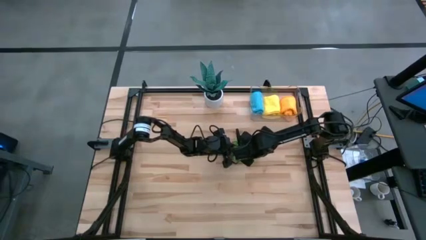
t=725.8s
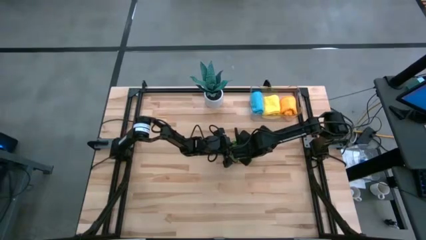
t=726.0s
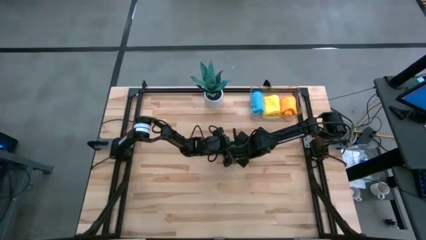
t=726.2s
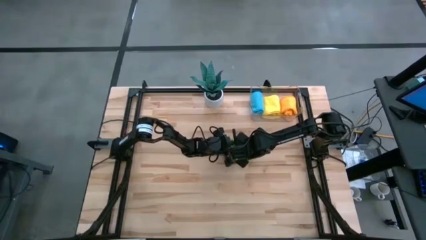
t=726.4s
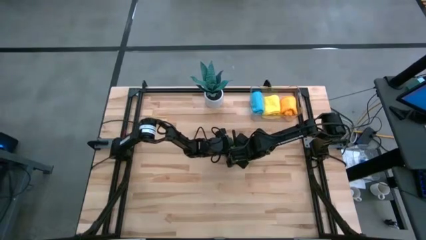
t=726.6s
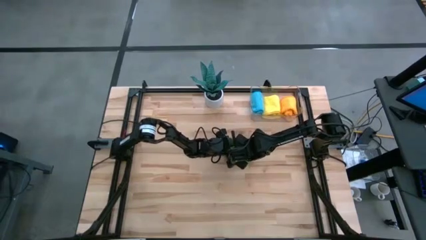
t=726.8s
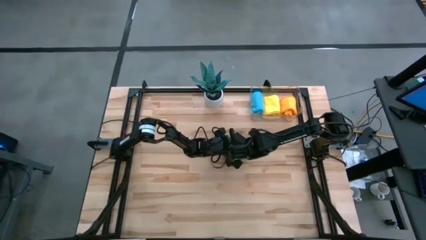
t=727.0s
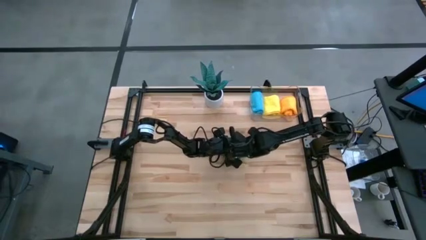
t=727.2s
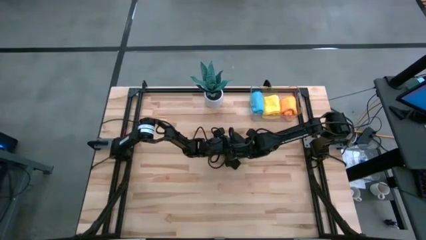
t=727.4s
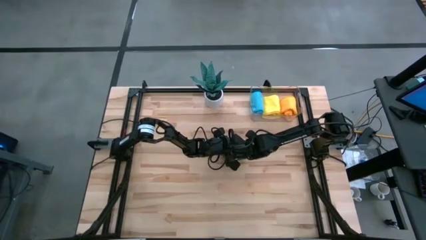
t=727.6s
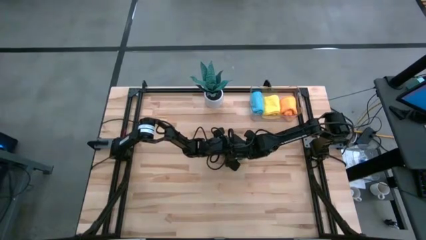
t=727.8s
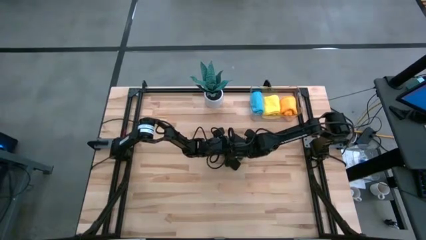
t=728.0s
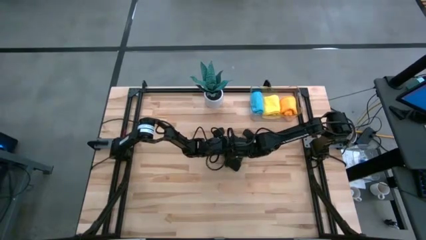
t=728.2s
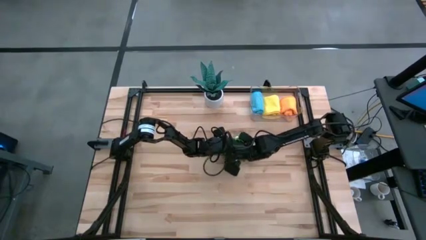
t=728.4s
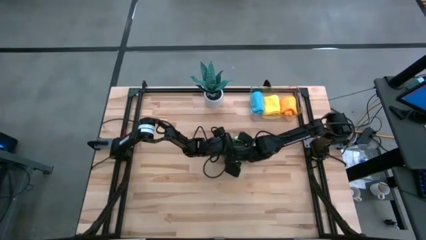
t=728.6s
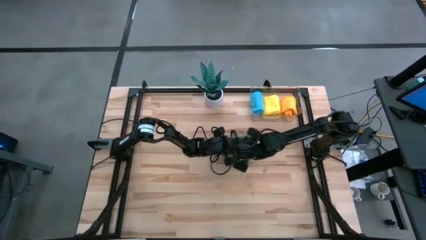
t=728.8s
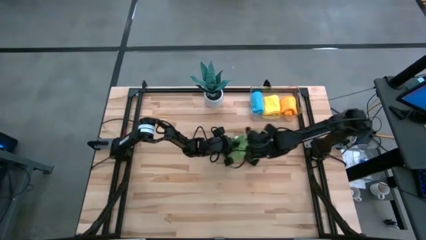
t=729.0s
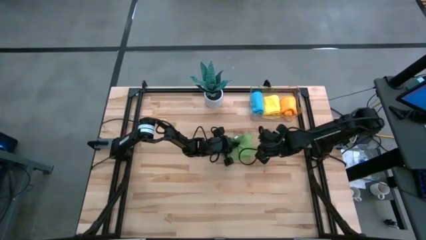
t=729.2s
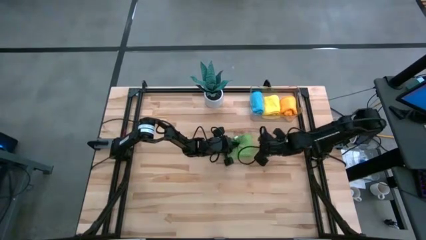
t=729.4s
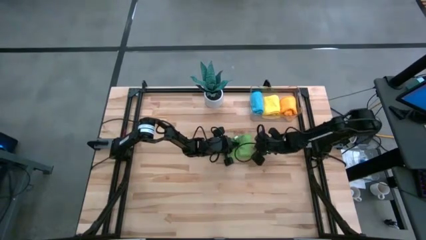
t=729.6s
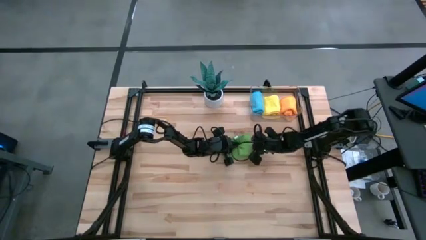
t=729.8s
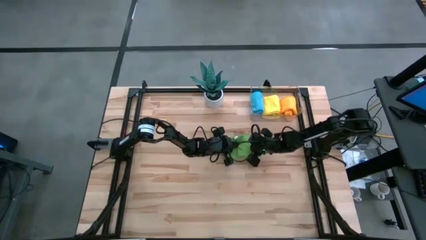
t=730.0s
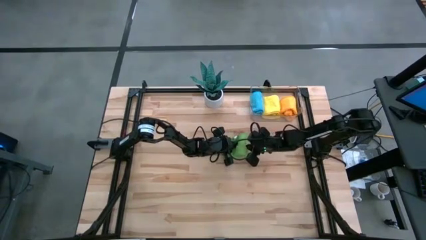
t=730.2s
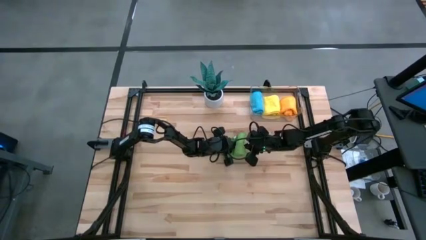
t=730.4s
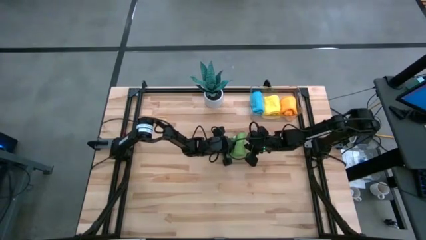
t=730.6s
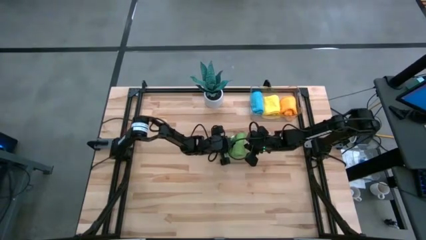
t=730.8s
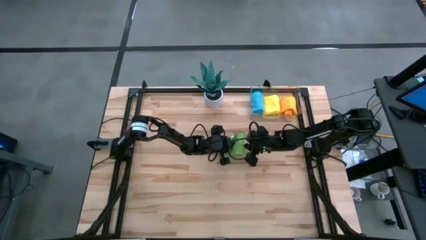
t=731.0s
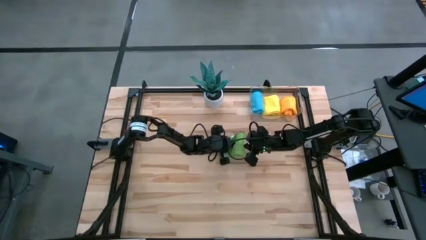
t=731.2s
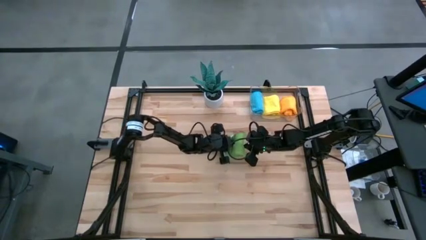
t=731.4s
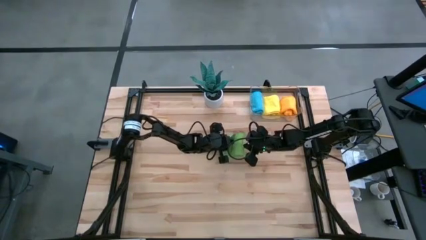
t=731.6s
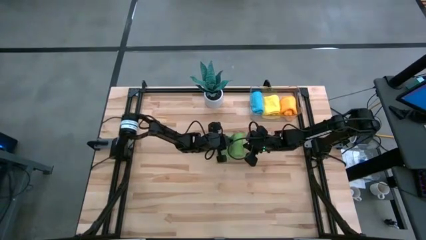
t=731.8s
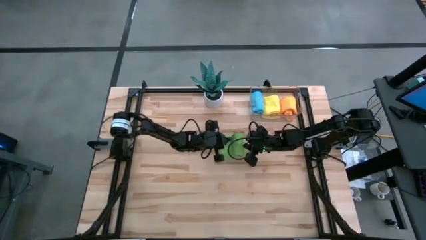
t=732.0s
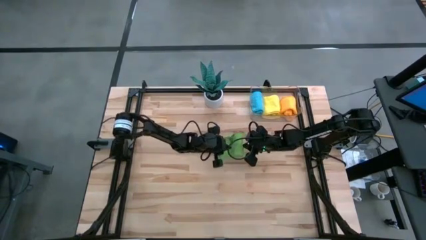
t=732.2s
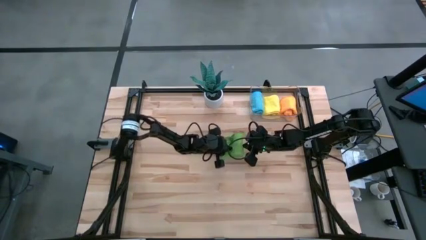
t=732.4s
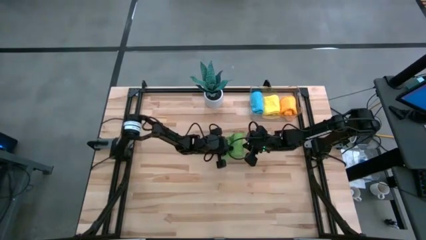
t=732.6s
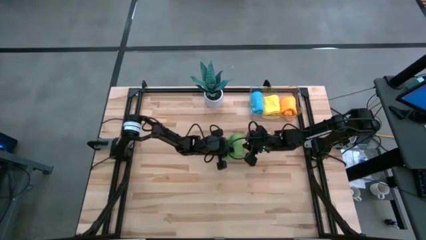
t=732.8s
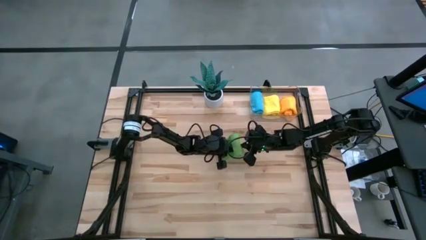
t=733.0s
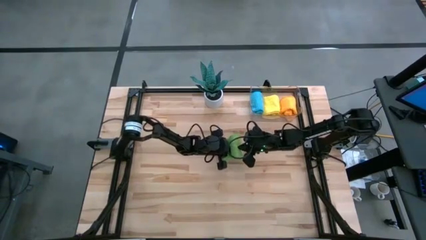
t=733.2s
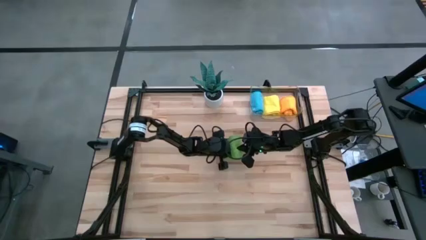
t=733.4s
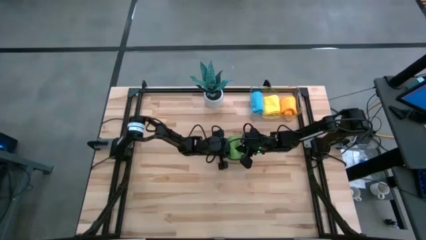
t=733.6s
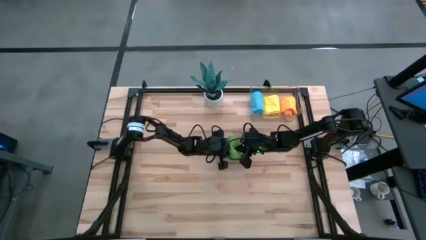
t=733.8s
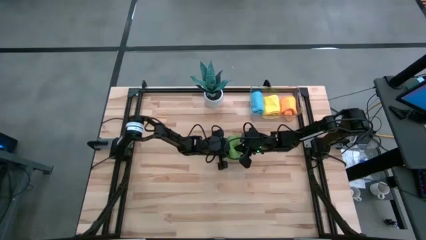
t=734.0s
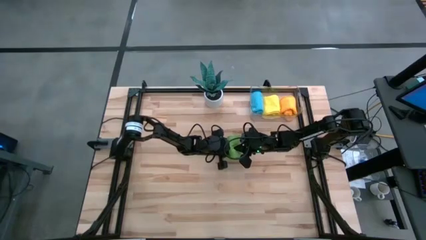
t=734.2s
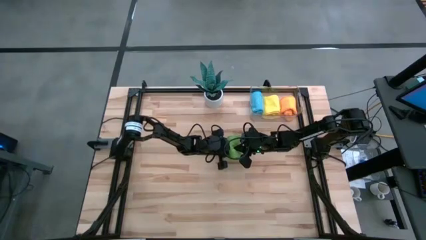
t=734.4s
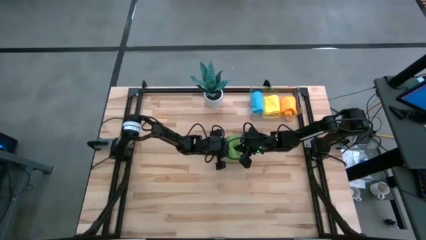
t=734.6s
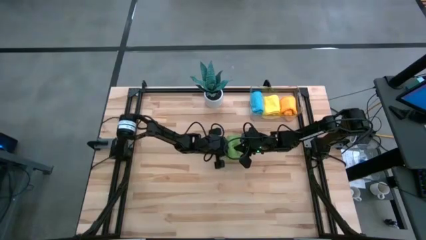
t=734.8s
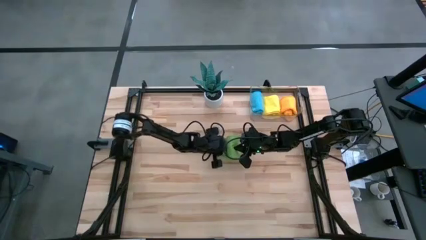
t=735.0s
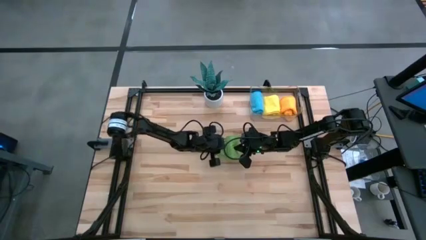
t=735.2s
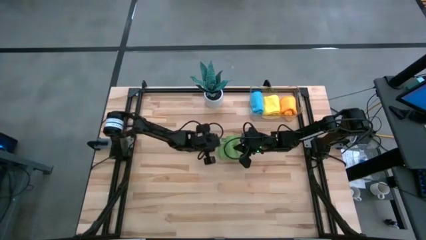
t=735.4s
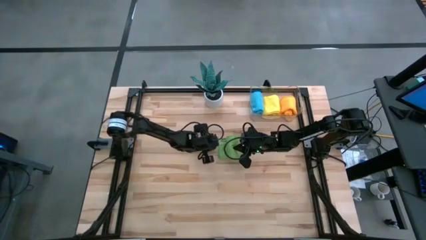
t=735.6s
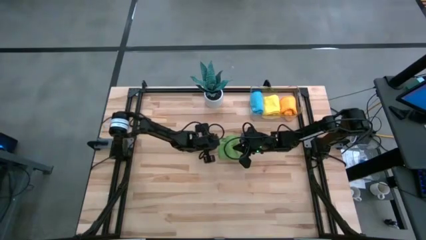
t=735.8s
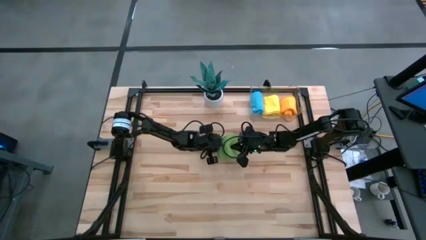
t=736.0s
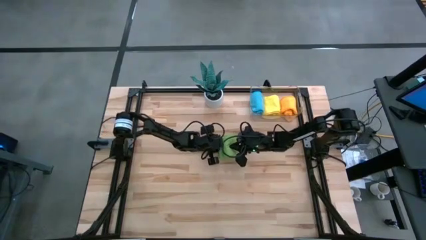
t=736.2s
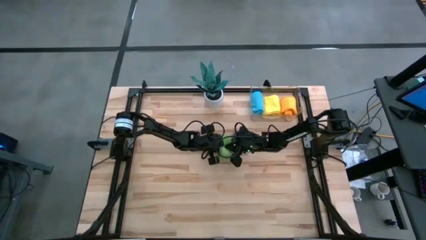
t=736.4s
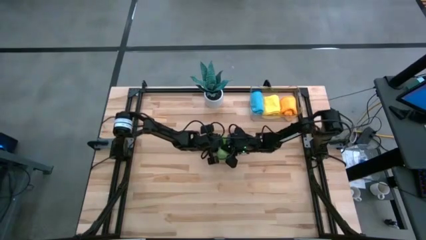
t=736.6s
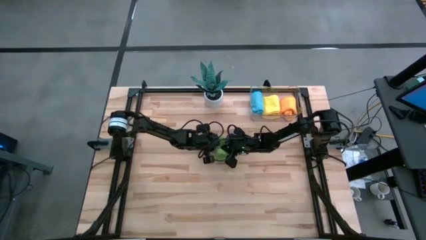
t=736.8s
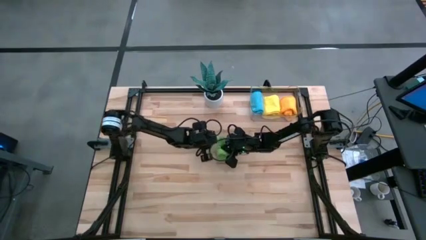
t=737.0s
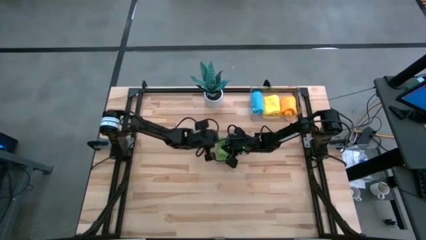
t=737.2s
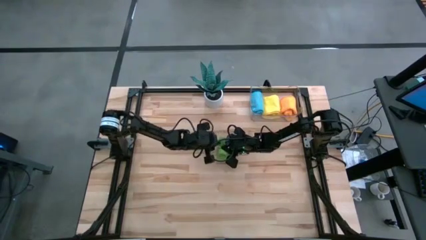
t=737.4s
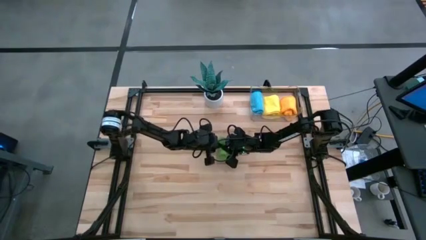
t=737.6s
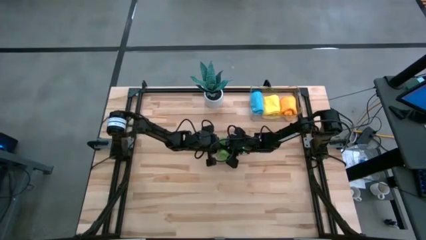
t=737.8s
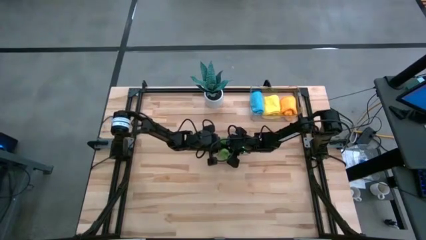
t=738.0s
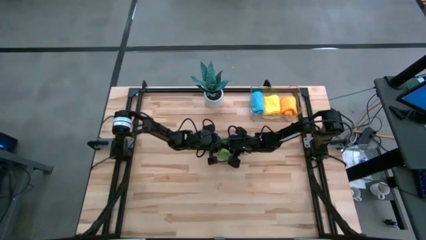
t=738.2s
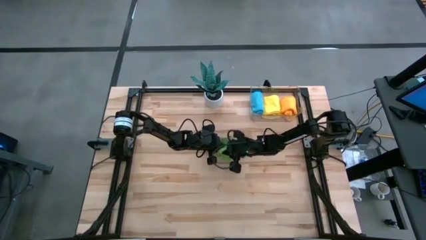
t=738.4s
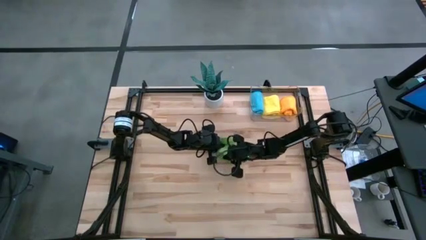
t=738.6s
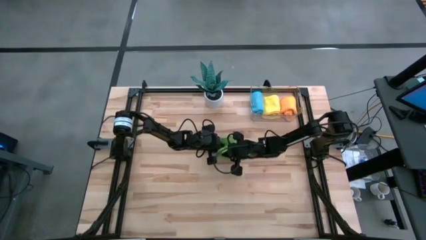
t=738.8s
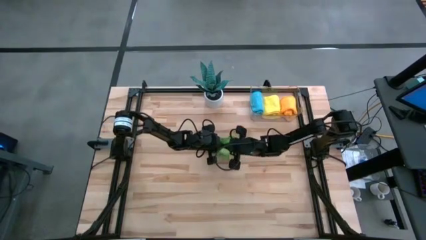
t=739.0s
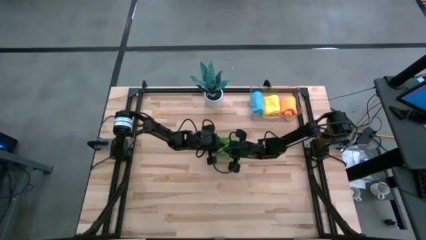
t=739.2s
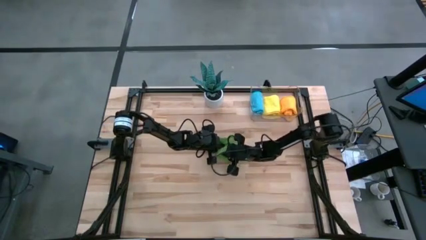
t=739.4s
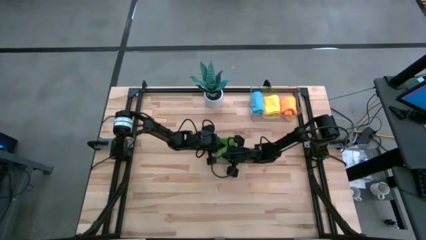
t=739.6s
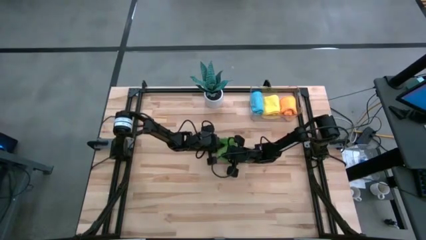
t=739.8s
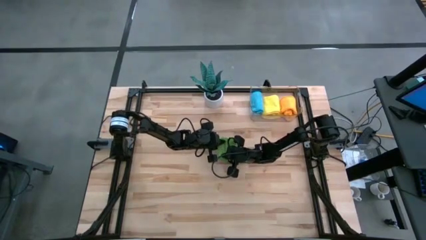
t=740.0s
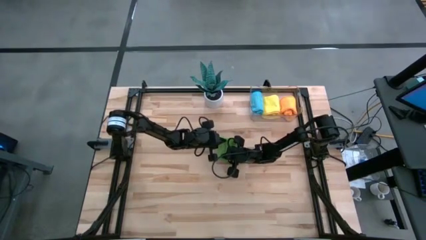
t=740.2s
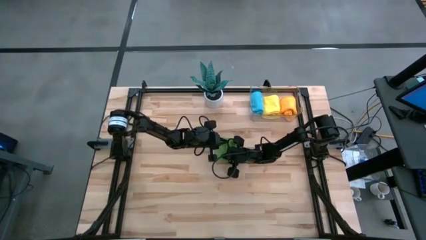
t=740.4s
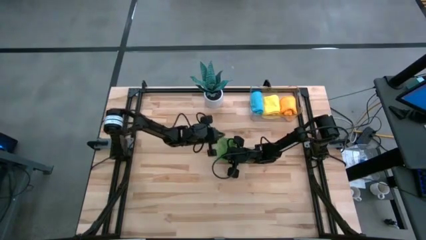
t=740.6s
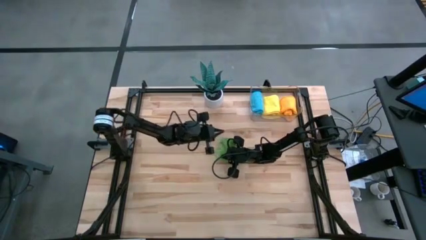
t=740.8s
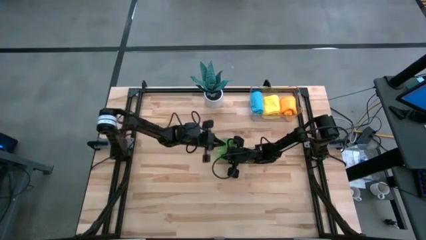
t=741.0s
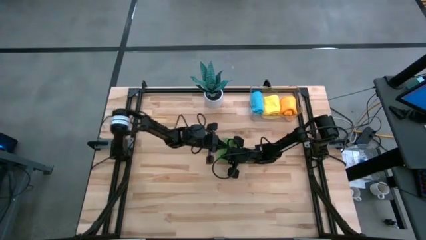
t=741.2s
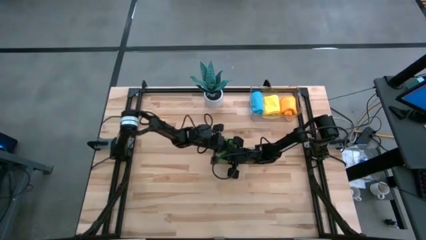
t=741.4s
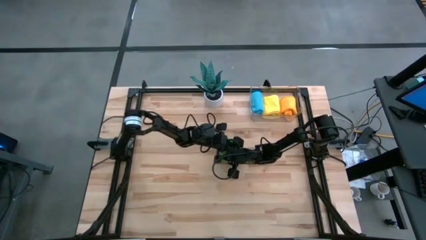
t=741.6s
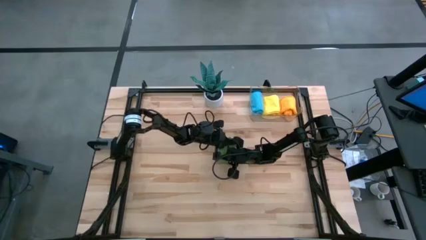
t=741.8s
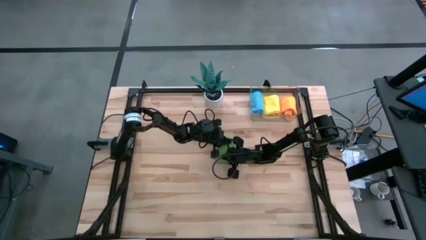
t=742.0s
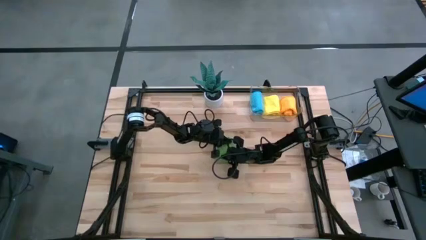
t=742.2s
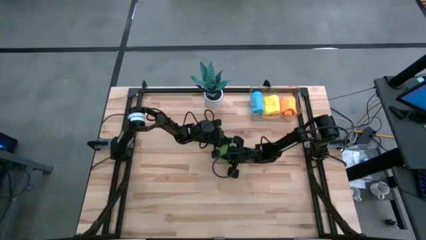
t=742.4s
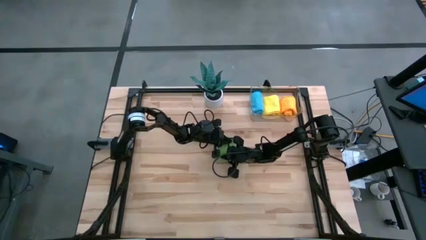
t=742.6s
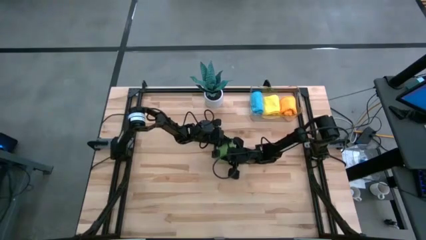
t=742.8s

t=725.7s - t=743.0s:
Task: Roll microfiber towels into tight, uniform cylinder then place into a basket
Roll the green microfiber cloth
